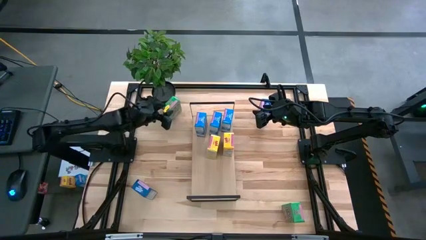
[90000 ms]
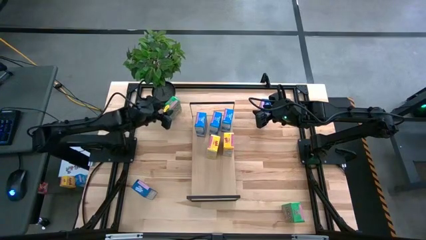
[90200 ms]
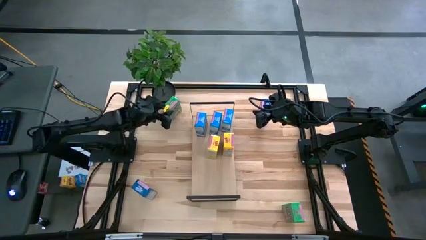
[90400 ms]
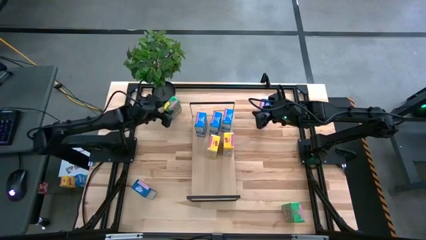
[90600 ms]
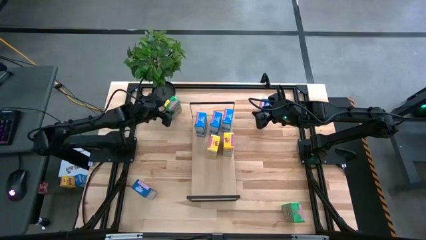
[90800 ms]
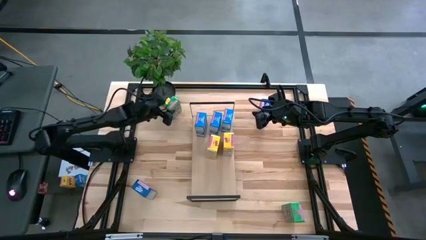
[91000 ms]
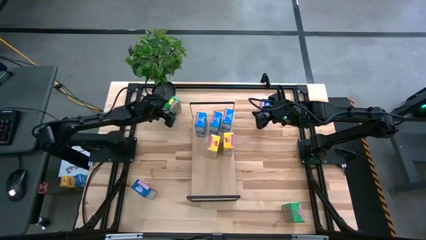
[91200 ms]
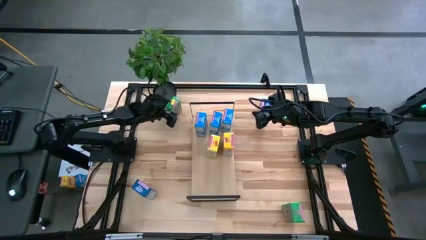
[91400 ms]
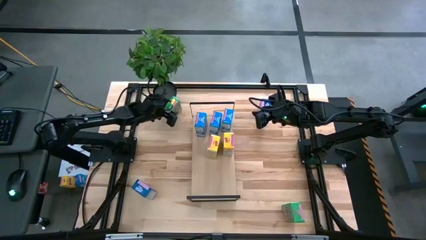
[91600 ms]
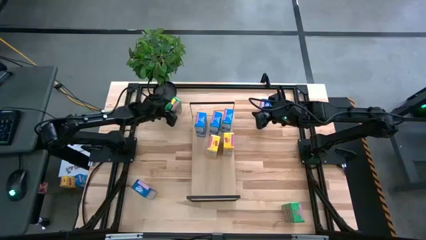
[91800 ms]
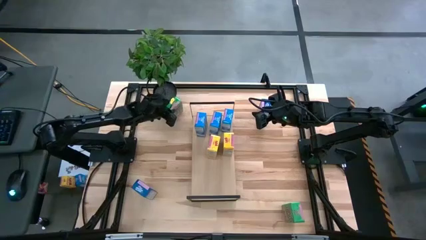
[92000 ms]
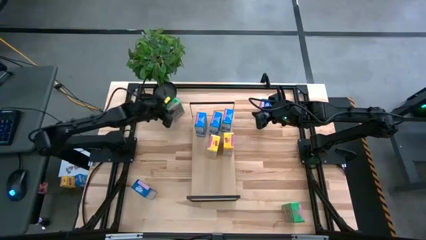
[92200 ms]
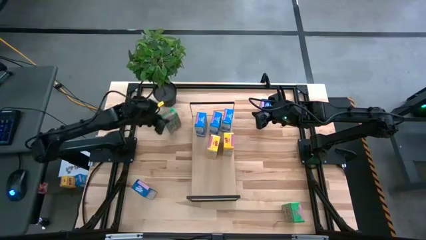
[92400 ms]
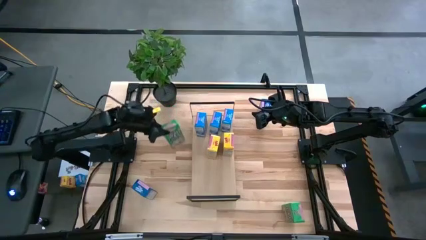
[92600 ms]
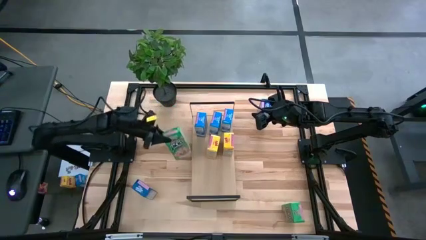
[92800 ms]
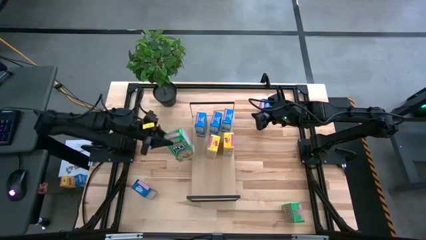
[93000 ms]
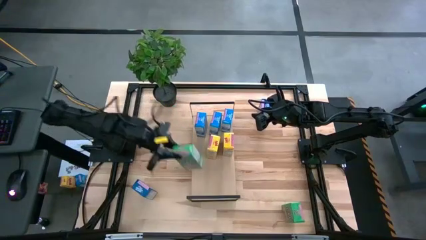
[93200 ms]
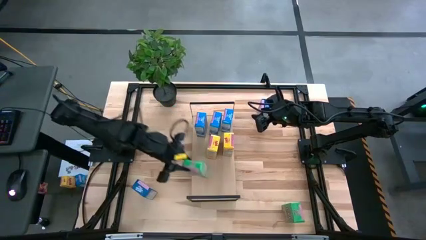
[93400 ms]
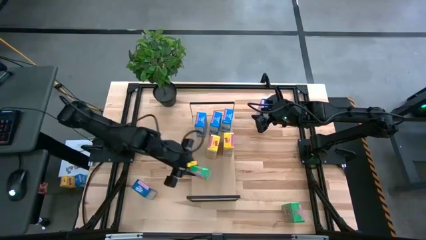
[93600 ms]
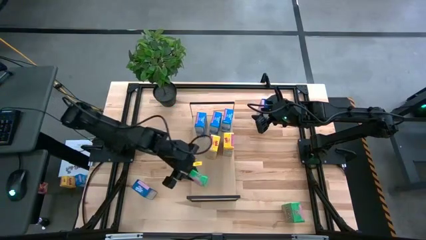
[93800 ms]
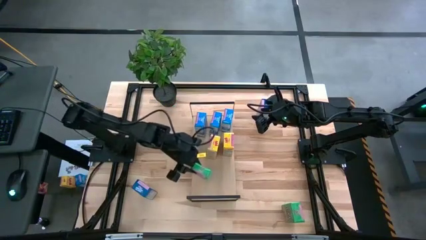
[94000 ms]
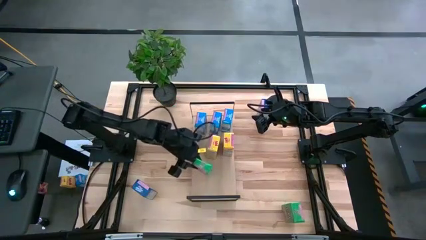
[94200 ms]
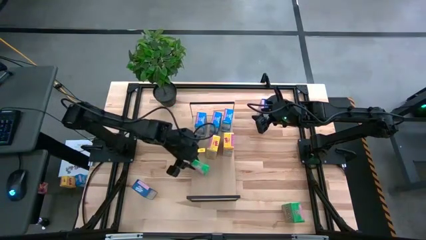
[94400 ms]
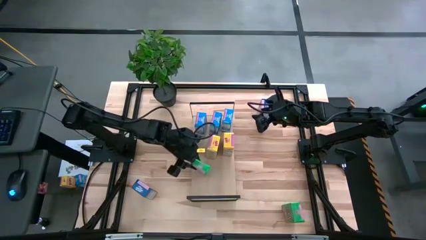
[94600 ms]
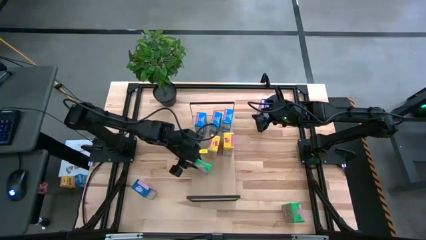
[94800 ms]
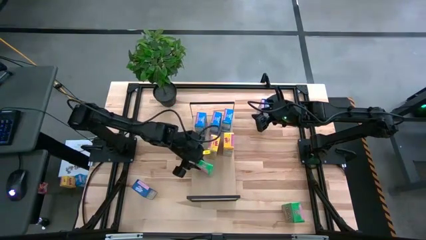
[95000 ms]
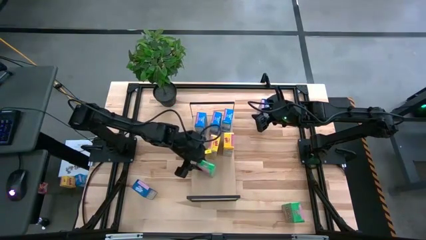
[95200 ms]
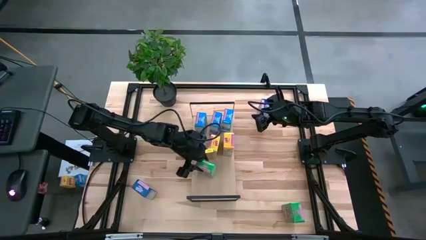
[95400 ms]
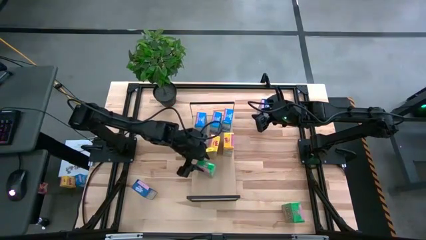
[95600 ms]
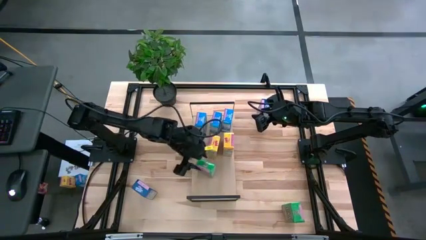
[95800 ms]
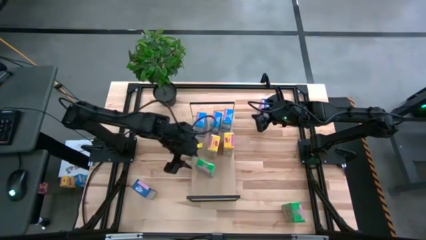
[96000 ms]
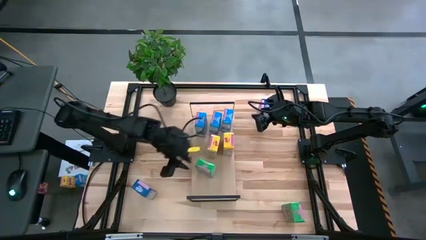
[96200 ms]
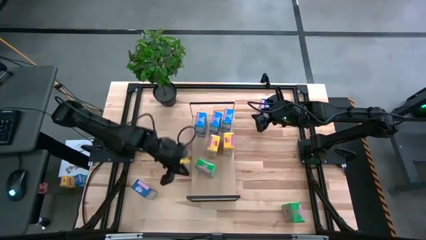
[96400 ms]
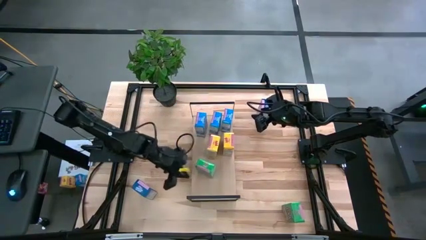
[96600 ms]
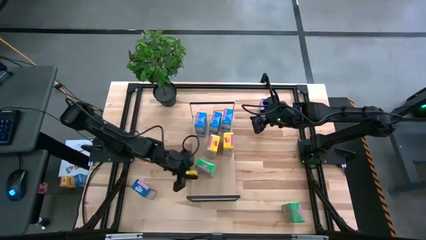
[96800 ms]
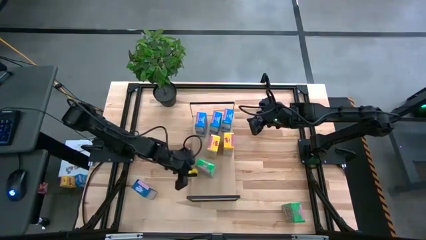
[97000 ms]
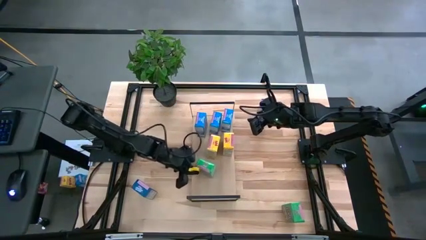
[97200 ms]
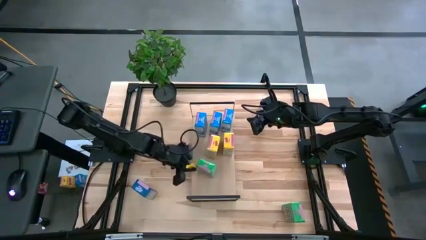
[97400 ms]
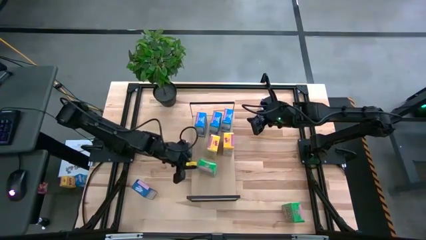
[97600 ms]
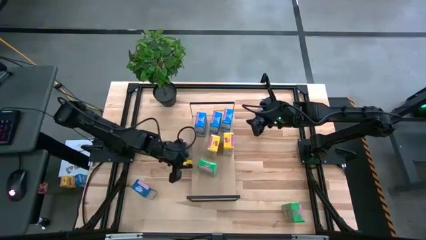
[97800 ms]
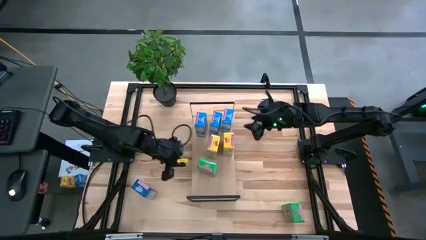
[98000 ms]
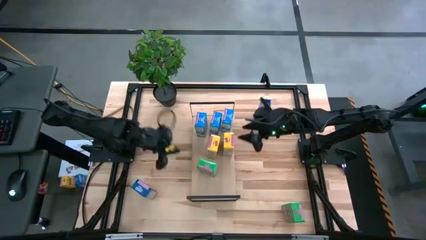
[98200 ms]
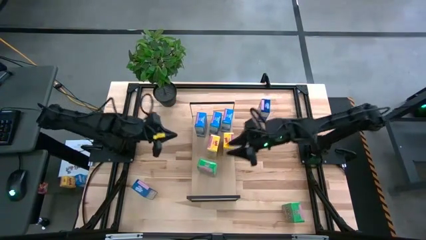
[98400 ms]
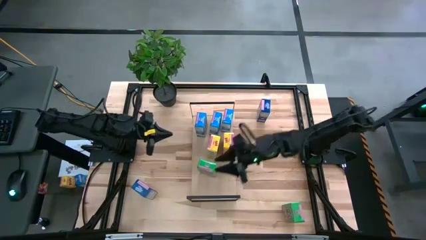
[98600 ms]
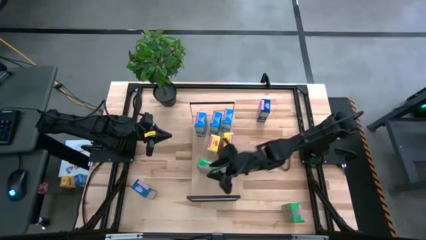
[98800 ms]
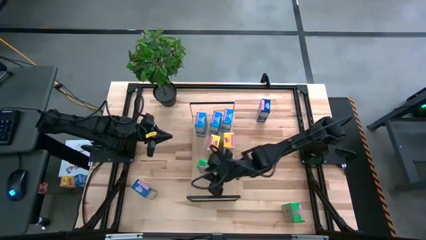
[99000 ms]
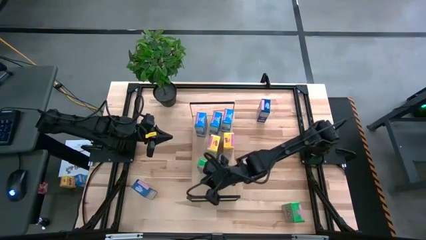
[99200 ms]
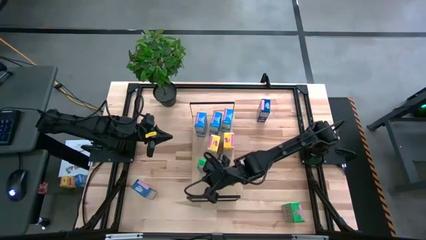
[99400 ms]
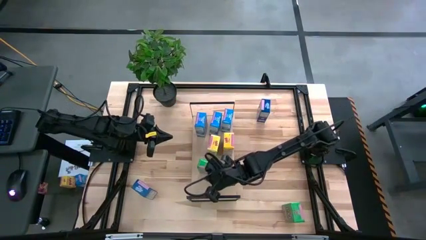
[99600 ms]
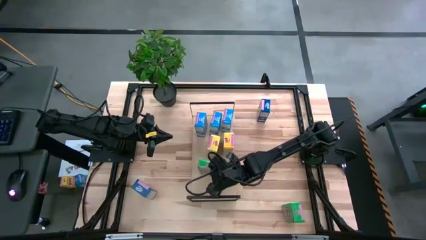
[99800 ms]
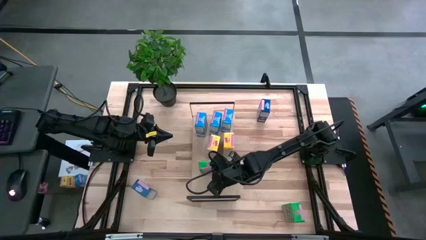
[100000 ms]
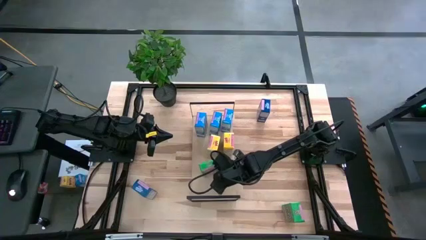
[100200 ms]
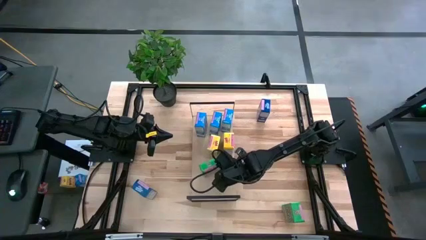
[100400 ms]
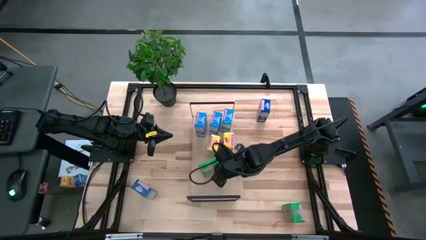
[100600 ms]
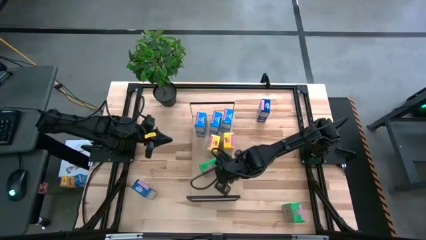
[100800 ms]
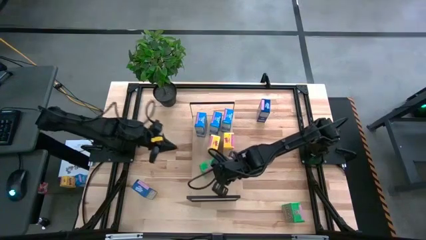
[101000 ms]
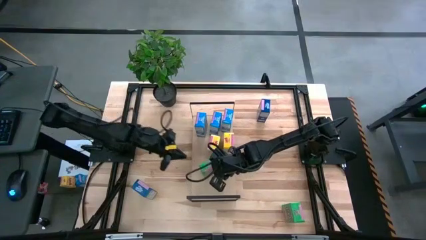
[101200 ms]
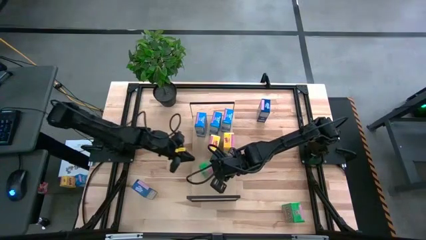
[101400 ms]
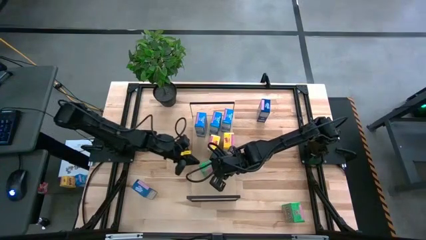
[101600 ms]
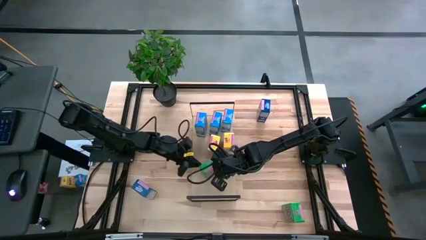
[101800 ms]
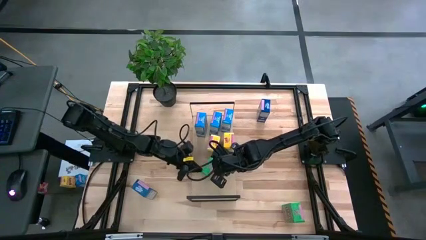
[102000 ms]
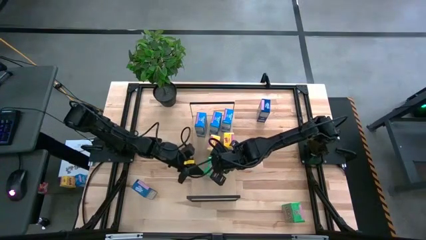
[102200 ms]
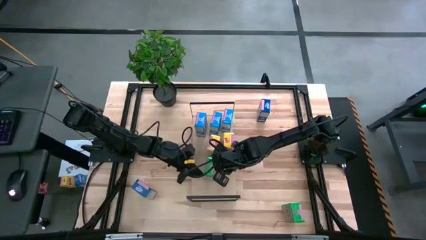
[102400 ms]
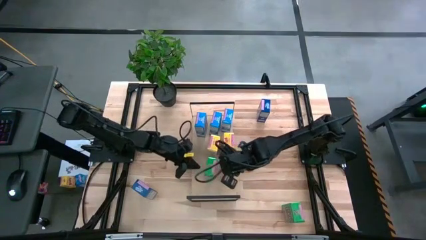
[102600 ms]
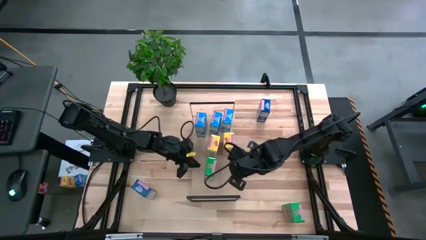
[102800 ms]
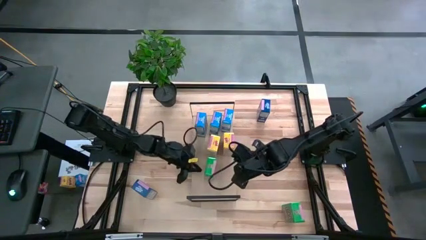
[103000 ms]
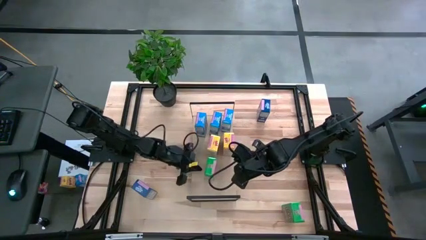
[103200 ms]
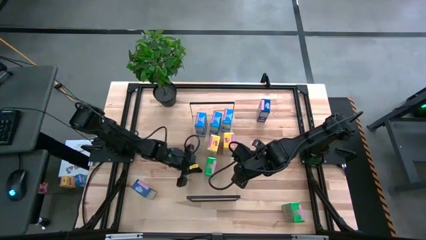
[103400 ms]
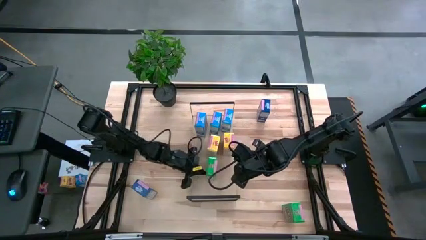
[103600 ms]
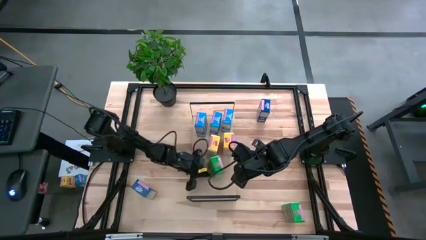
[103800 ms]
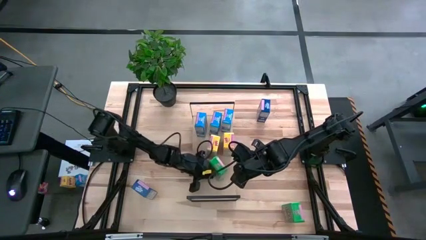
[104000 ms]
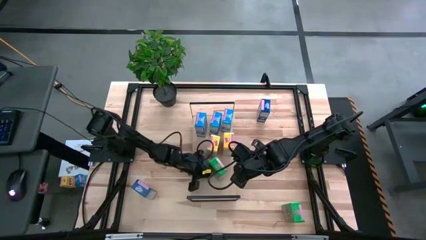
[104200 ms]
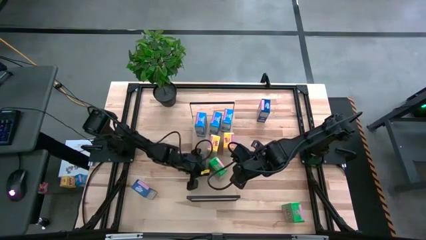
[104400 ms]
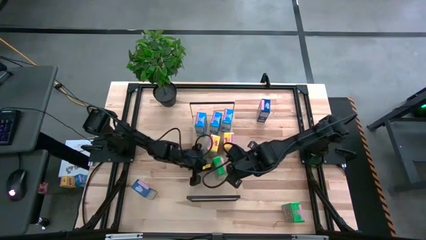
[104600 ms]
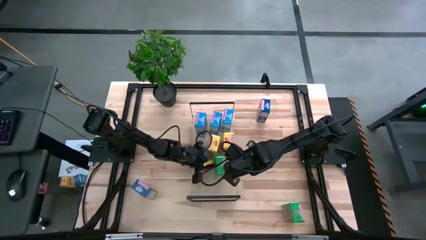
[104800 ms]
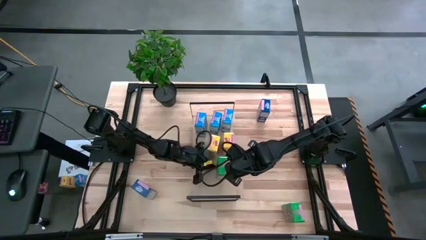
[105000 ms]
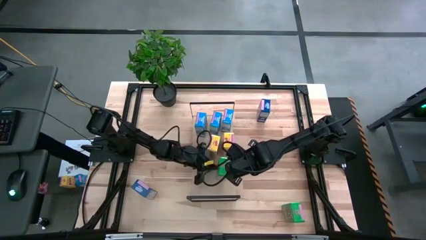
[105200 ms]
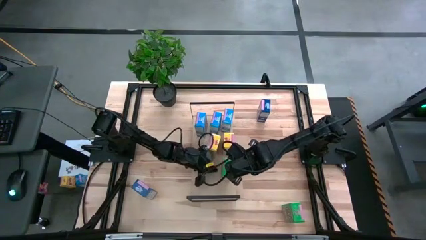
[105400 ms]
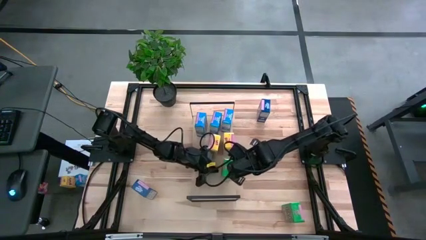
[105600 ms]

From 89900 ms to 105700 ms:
Task: Stack cereal on shelf
Put the top green cereal box on the shelf
